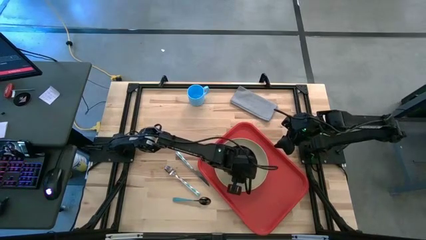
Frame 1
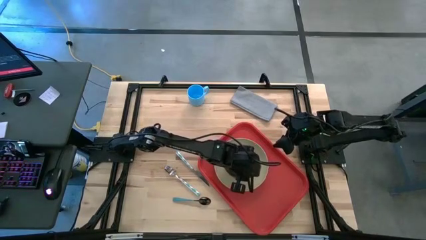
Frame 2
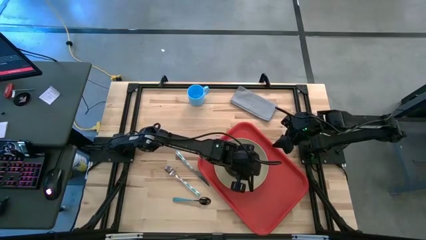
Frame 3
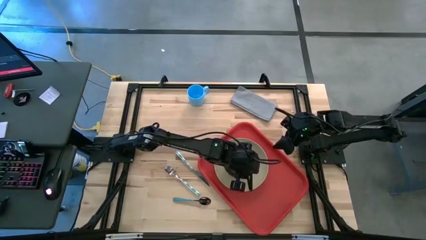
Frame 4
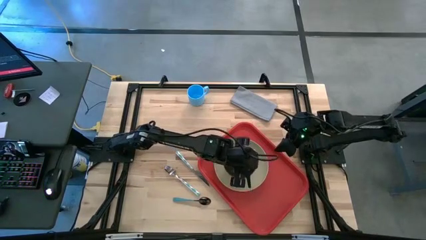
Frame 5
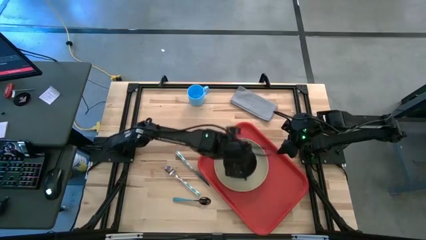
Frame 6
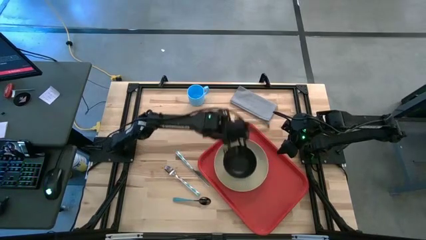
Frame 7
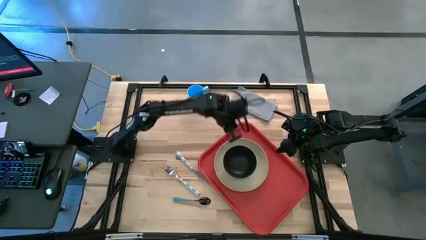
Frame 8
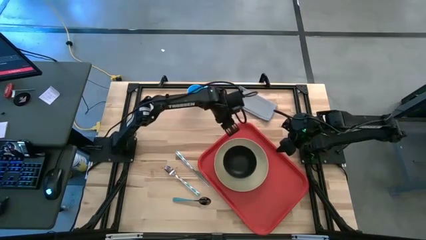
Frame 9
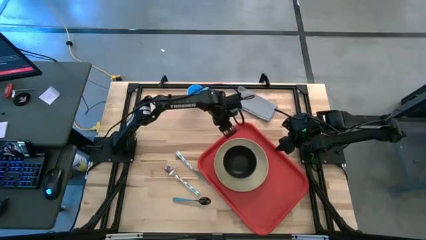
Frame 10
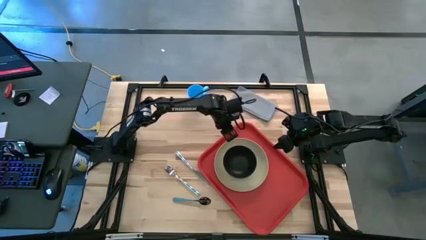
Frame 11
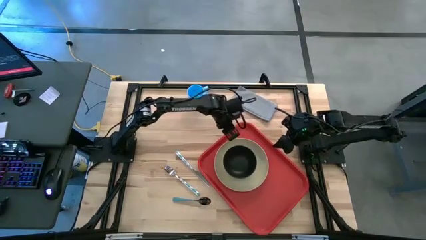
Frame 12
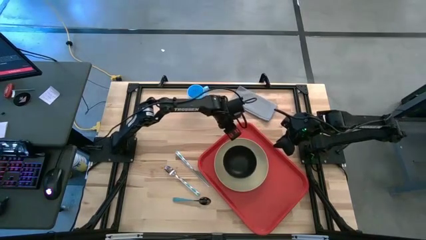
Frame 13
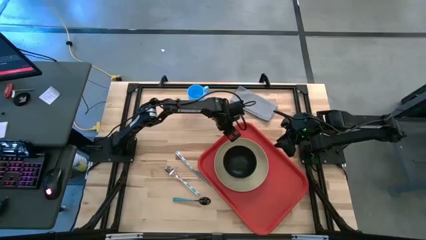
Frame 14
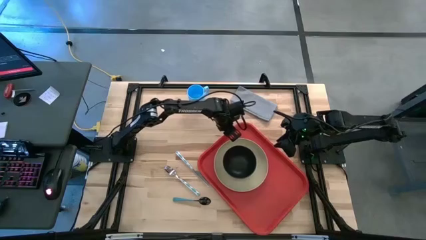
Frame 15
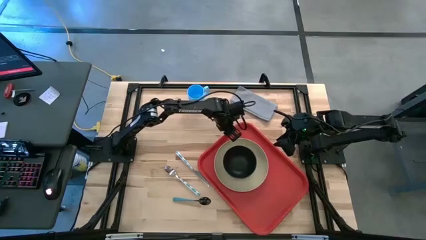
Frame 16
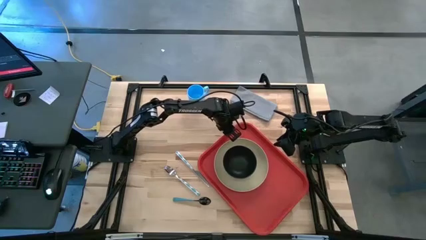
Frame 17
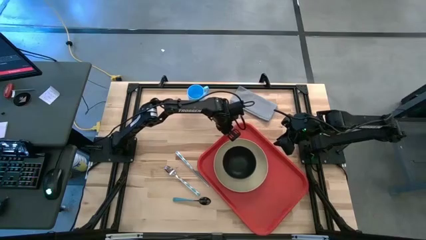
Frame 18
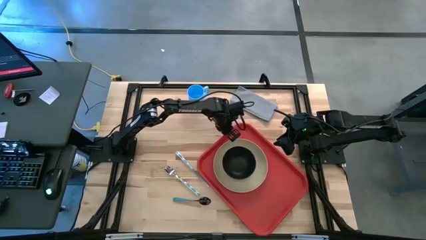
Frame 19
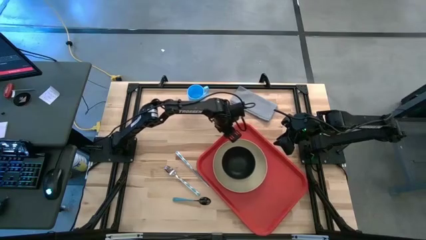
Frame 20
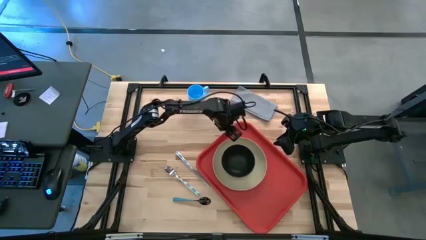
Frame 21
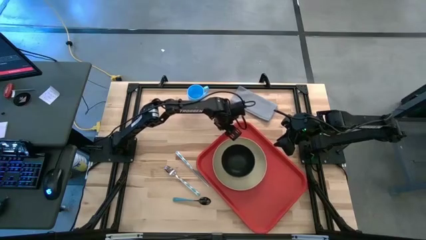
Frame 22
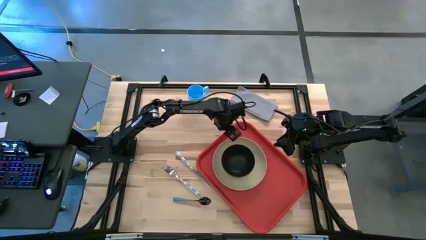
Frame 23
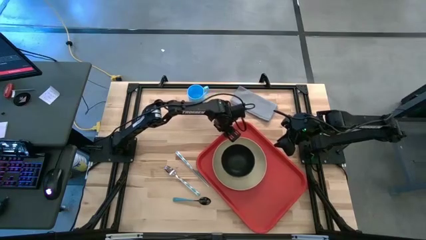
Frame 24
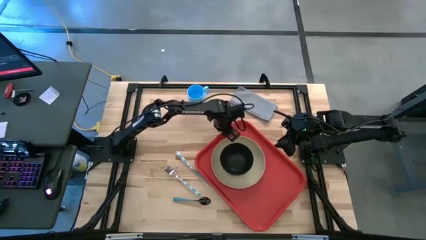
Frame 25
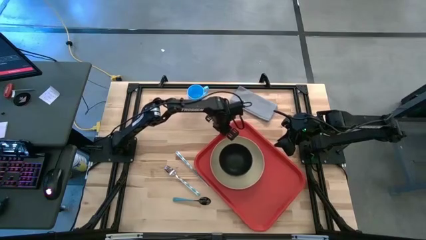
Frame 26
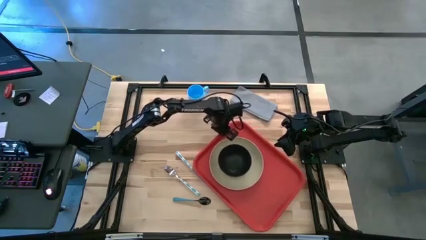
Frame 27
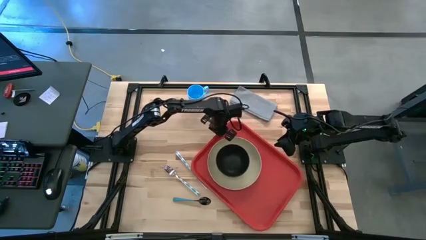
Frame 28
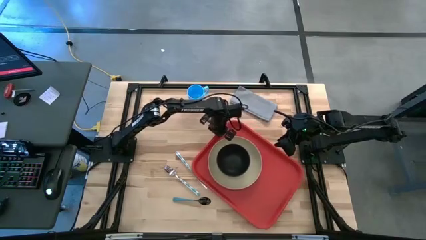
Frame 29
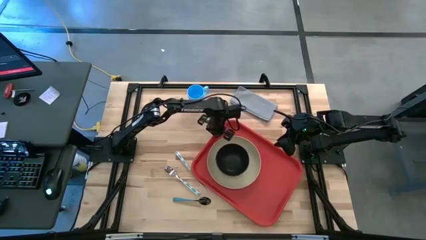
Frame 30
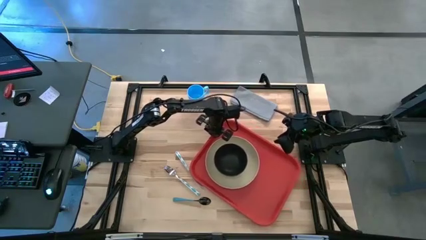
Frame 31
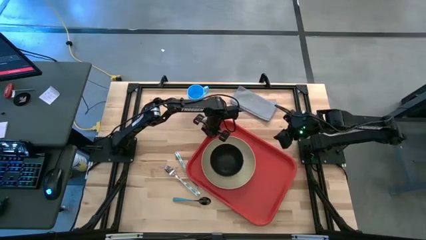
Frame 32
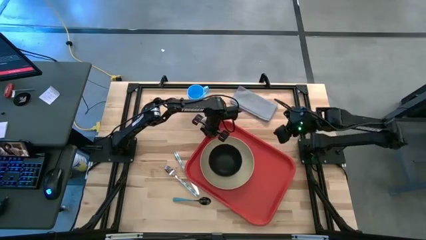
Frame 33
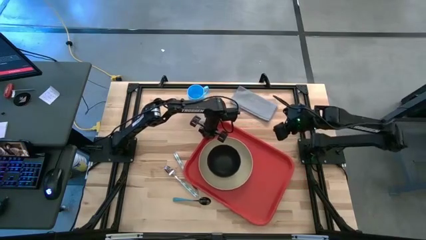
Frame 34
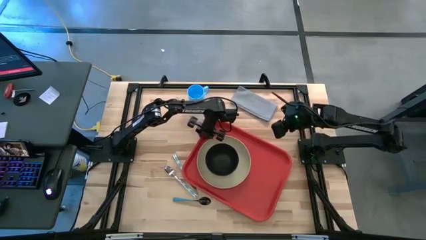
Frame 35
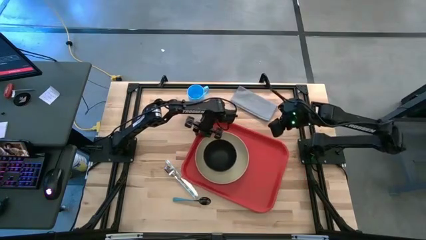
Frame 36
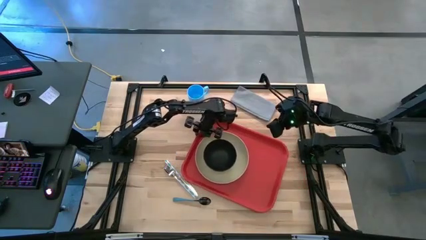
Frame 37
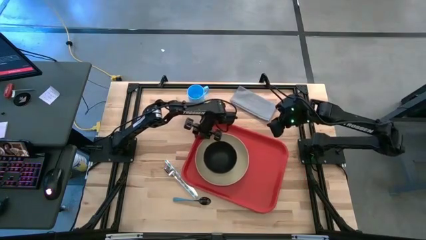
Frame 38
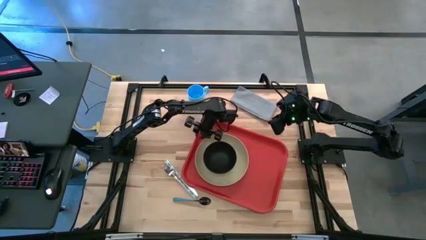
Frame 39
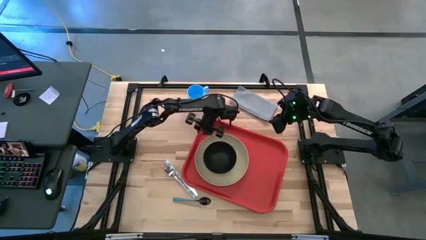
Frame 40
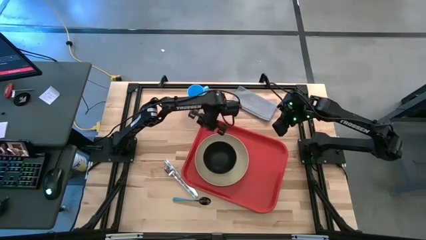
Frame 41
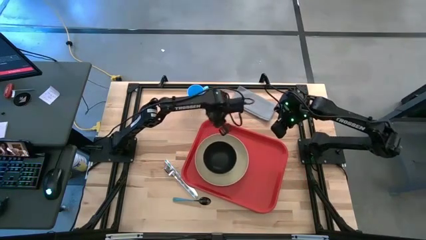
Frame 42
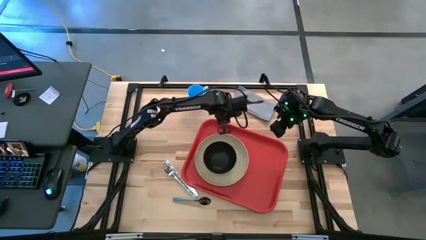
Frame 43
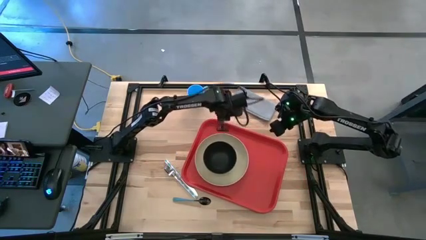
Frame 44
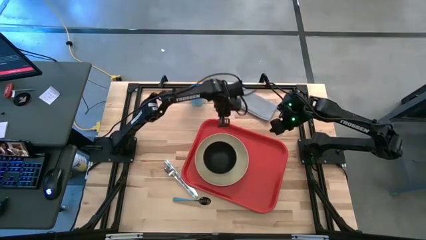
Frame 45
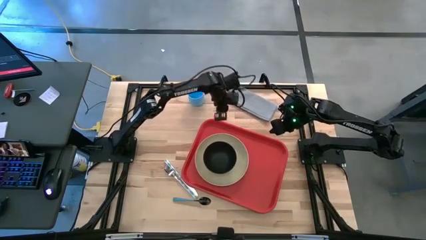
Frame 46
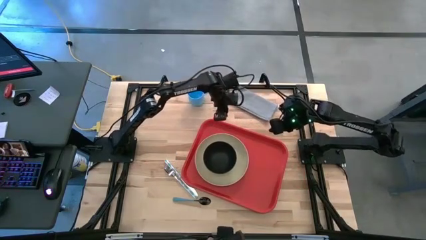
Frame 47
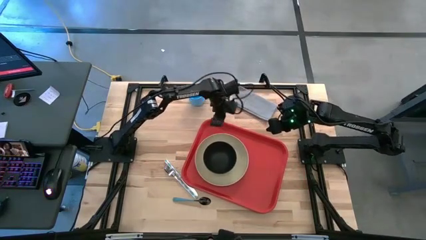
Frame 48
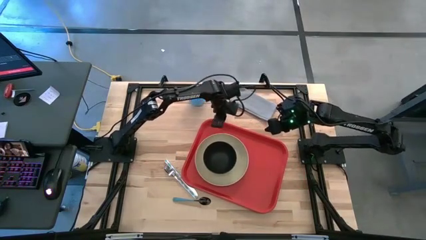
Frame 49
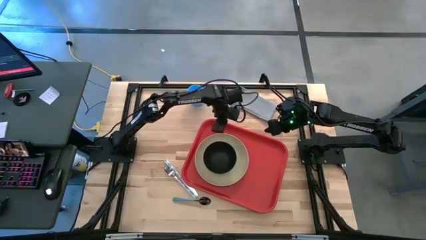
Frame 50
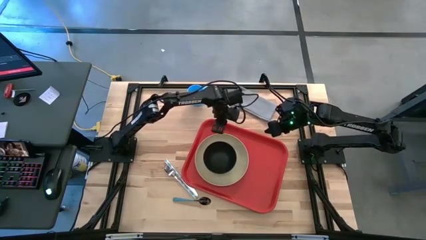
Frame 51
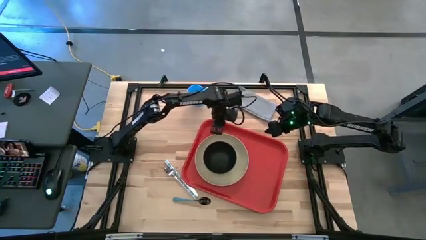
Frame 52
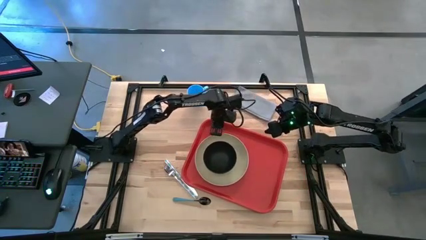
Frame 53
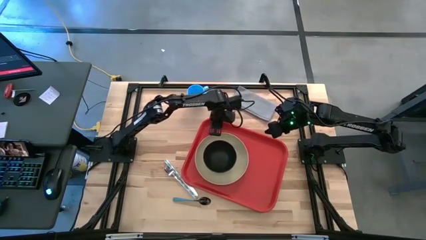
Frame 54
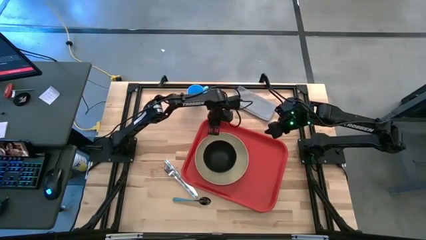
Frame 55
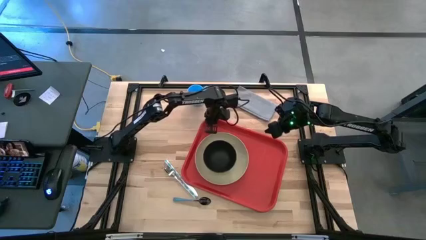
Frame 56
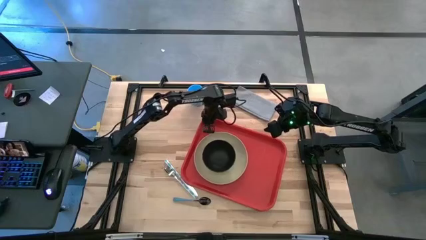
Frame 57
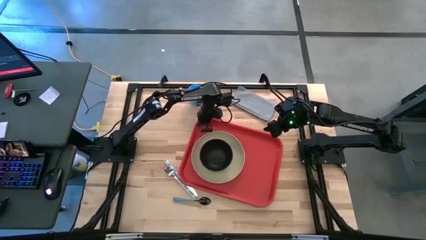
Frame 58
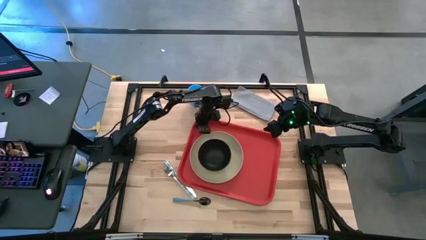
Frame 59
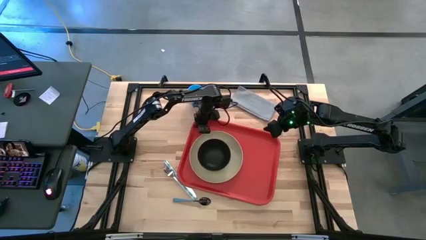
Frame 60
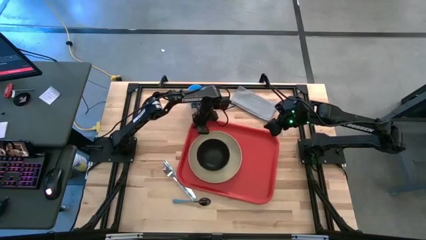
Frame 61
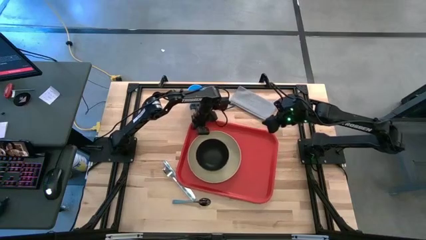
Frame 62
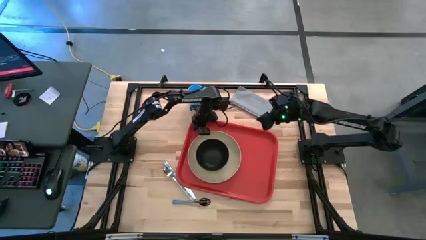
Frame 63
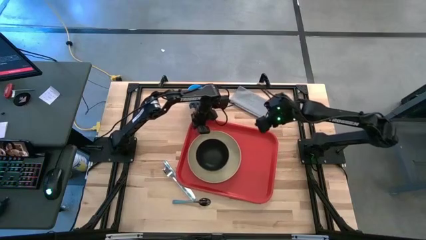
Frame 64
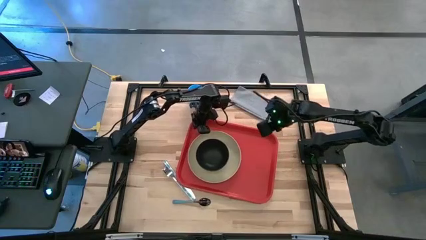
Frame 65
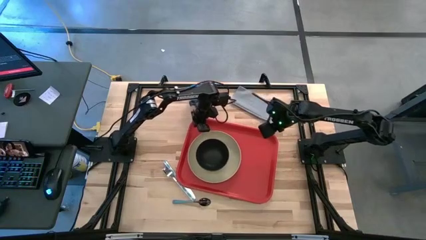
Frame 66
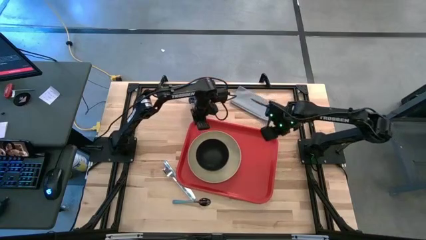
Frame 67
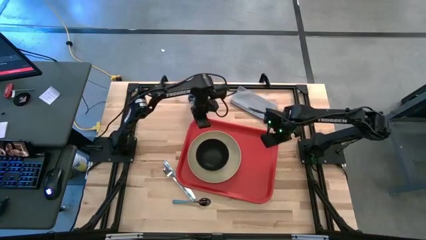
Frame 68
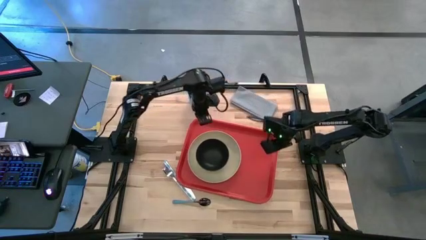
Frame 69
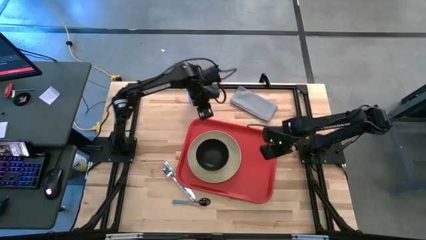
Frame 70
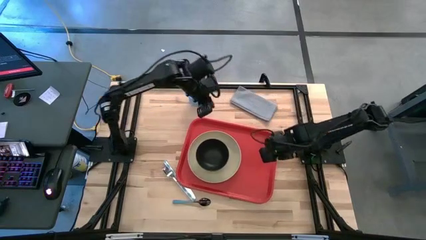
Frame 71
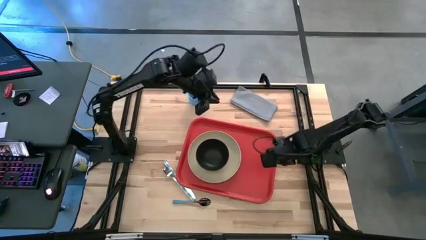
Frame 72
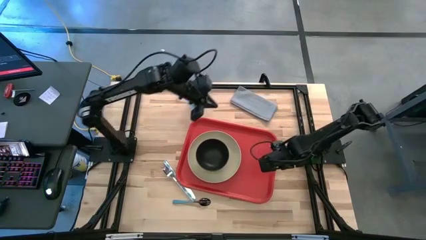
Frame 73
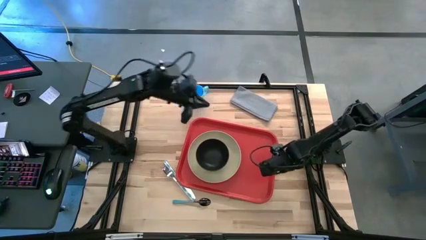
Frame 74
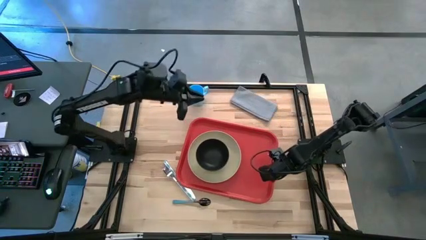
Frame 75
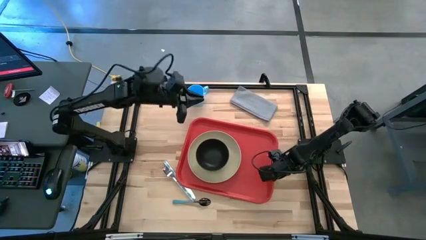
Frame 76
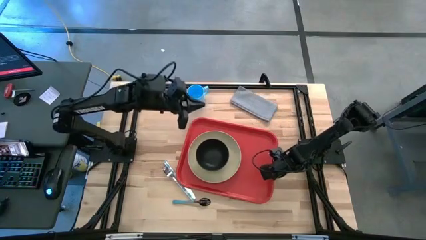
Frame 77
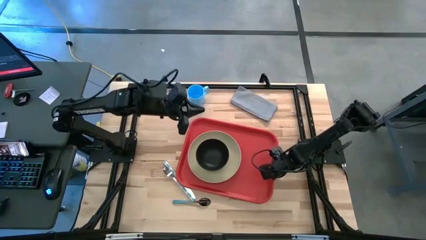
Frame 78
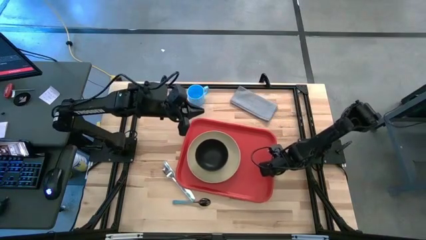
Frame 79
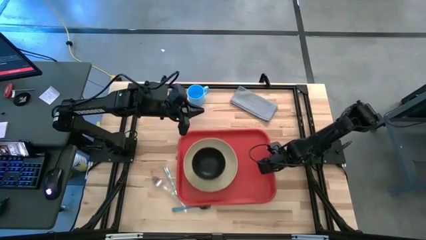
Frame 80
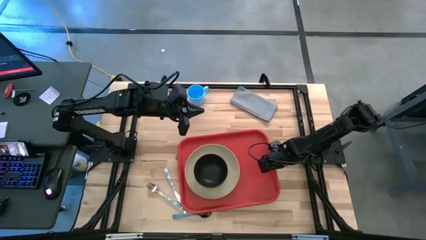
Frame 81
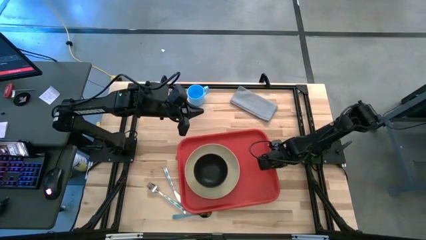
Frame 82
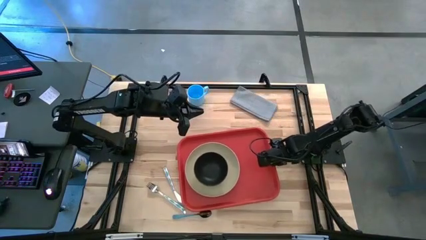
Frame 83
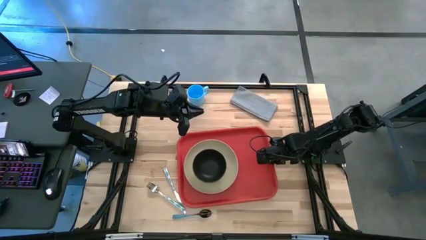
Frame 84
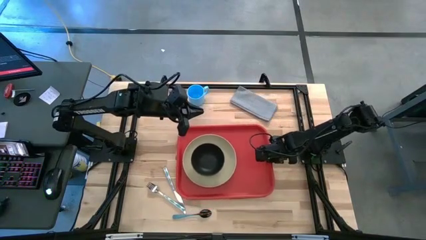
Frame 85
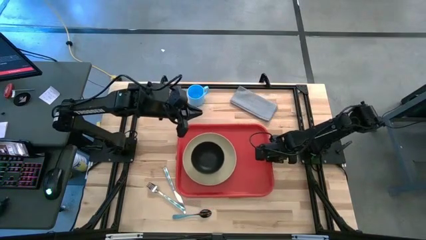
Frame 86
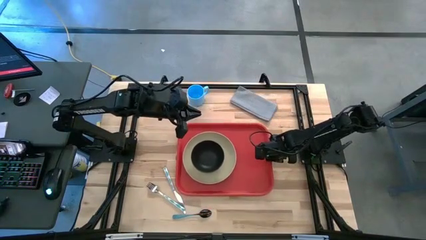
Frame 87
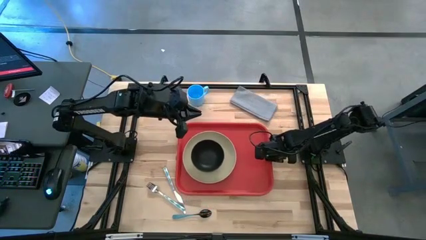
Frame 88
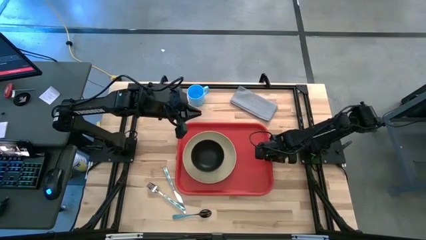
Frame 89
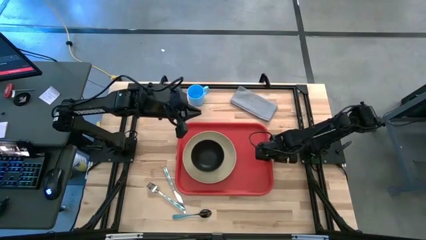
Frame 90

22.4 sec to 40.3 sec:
Task: Set up tray
Adjust the red tray
